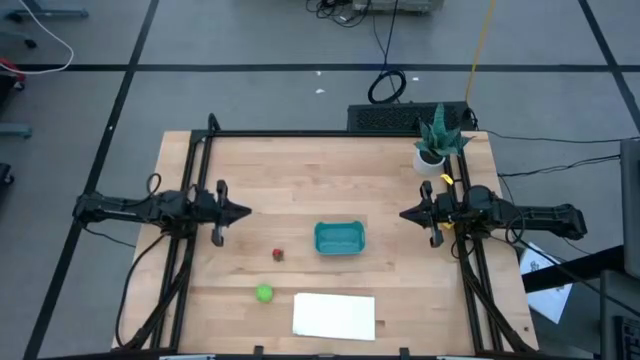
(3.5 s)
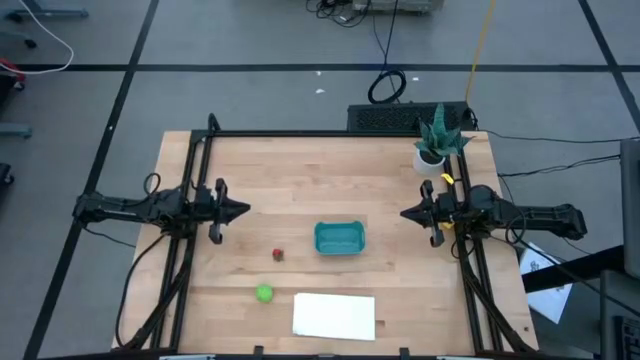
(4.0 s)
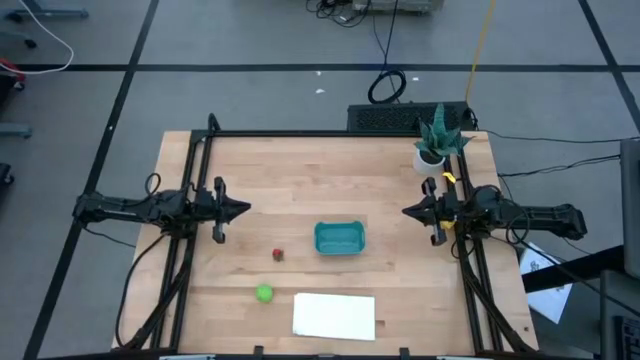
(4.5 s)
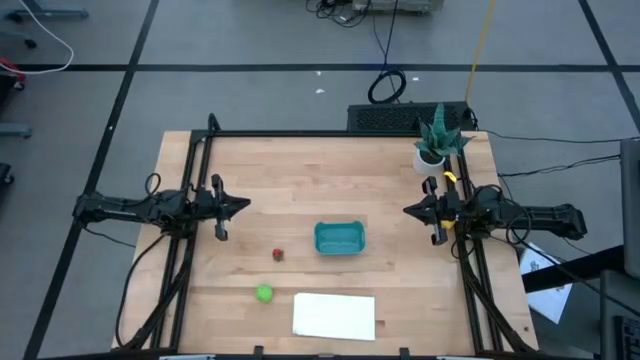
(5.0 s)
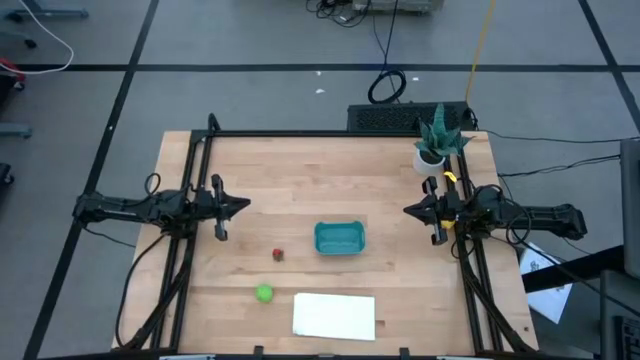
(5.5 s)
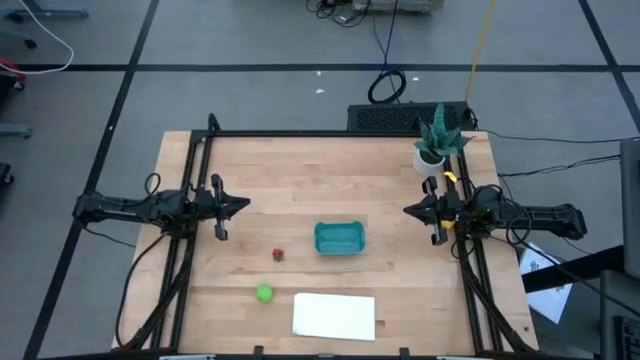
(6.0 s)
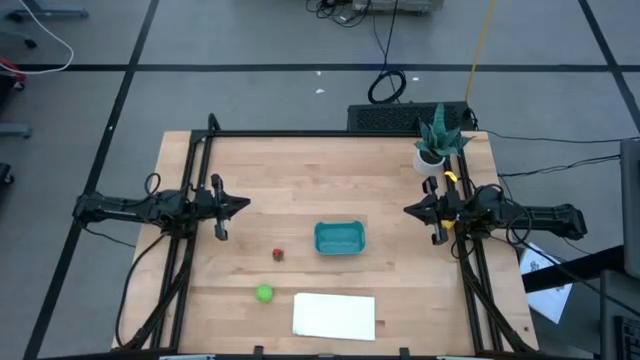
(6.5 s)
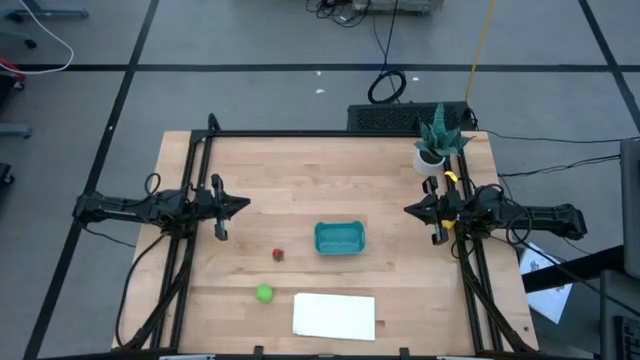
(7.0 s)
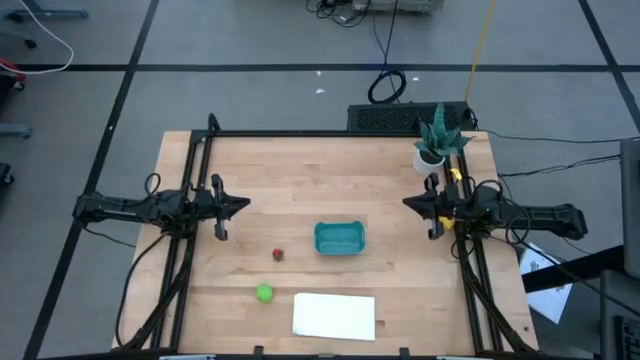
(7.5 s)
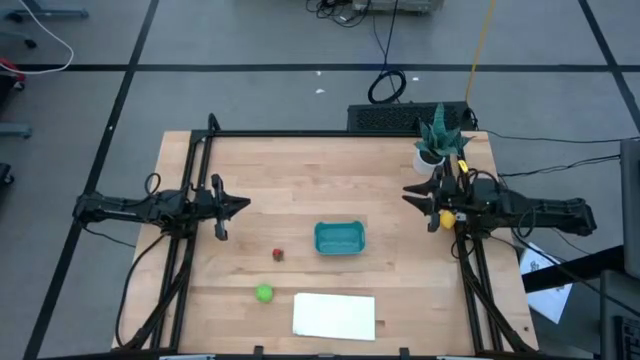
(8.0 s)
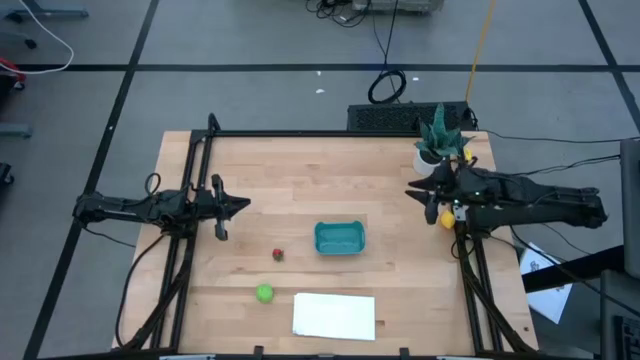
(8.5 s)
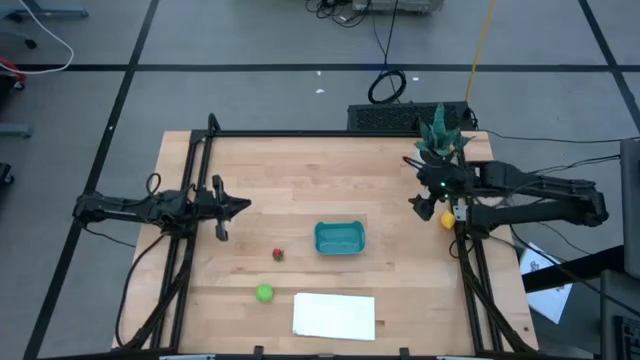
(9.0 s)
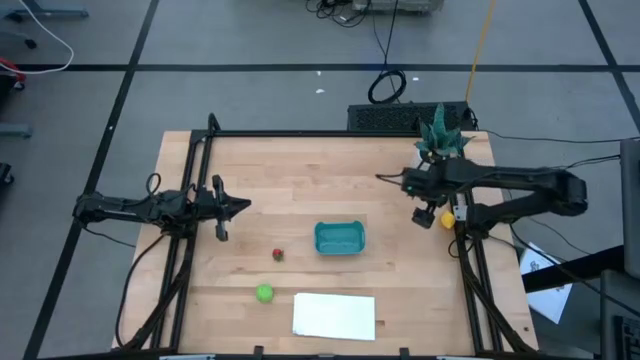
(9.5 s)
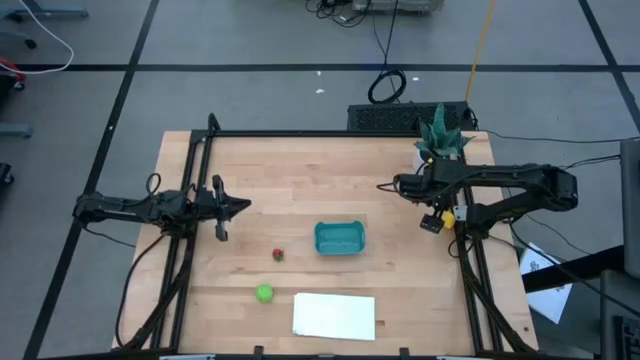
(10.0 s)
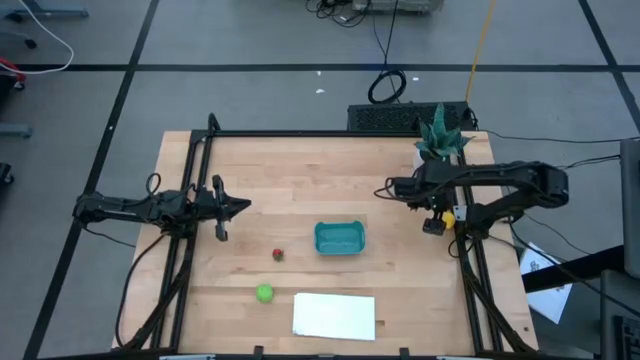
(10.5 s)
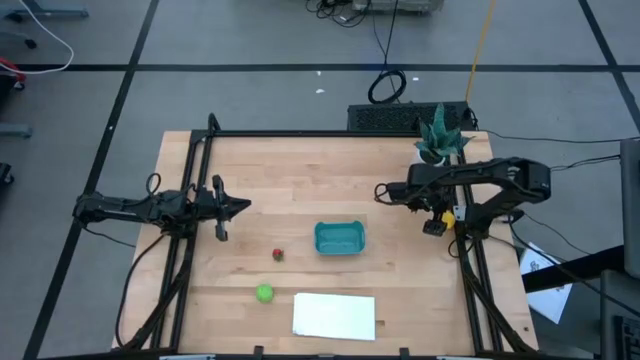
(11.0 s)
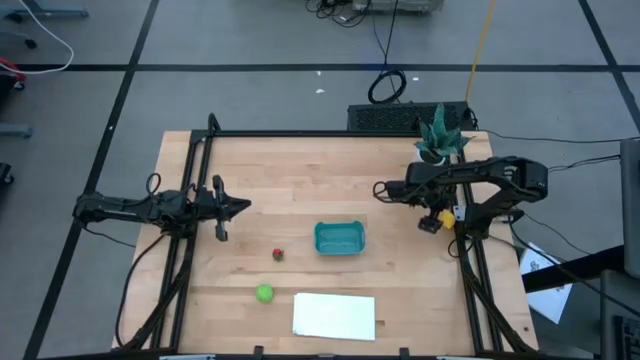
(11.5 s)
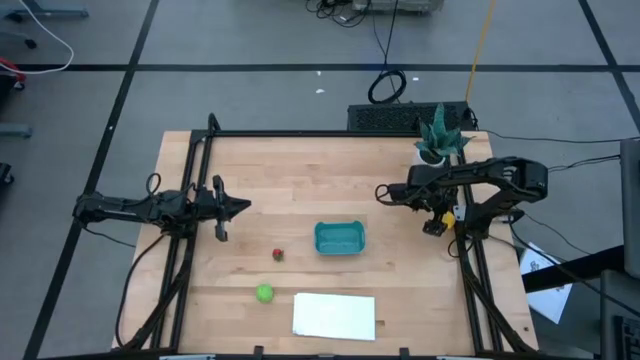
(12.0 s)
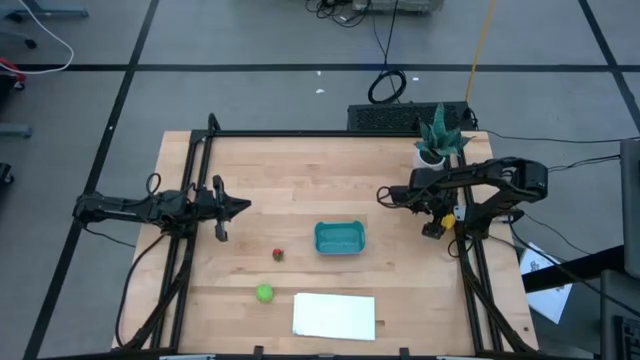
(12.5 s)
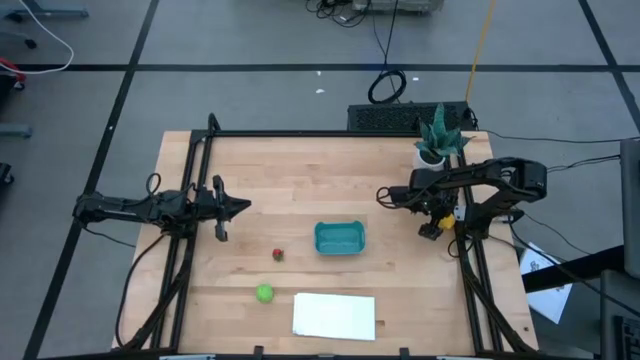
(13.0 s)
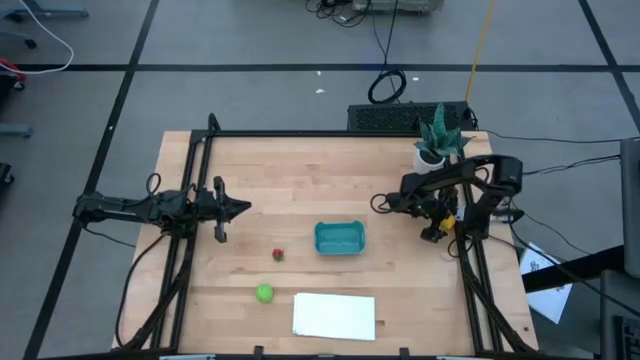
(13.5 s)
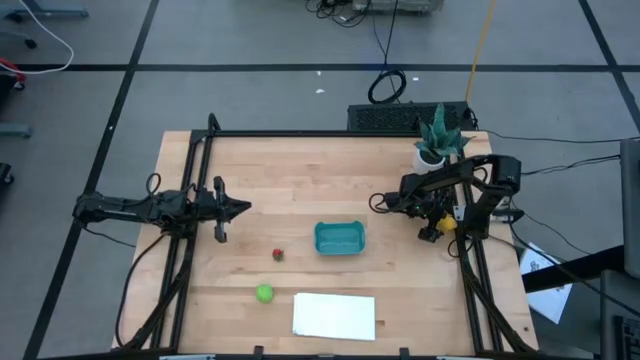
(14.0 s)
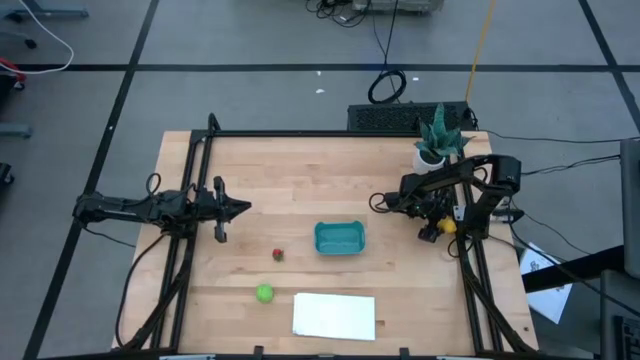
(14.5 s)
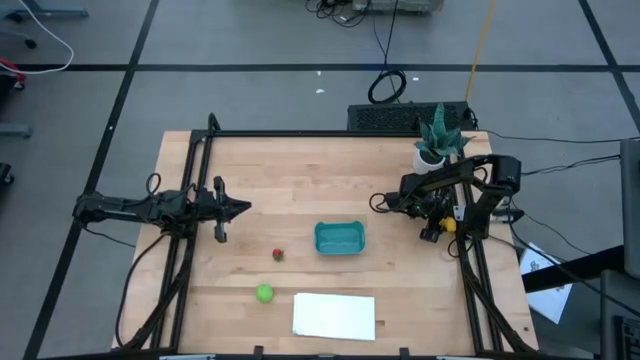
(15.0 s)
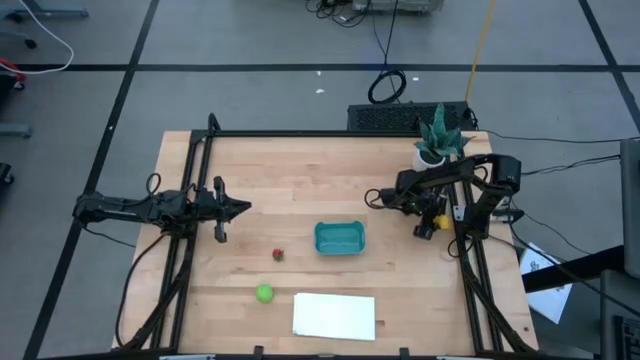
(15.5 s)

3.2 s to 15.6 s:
Task: Pick and placing Produce into tupperware
Put the yellow lemon into the blue bin

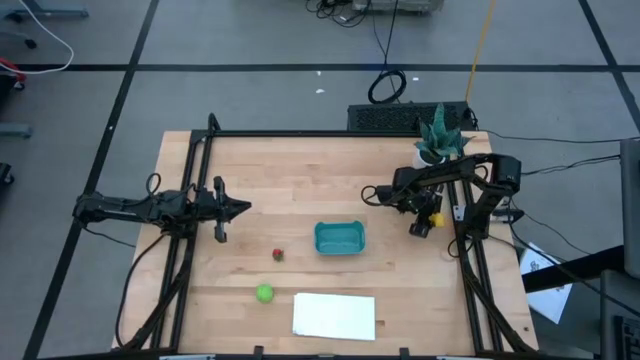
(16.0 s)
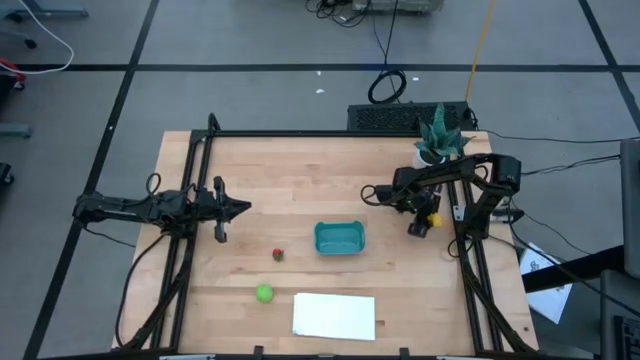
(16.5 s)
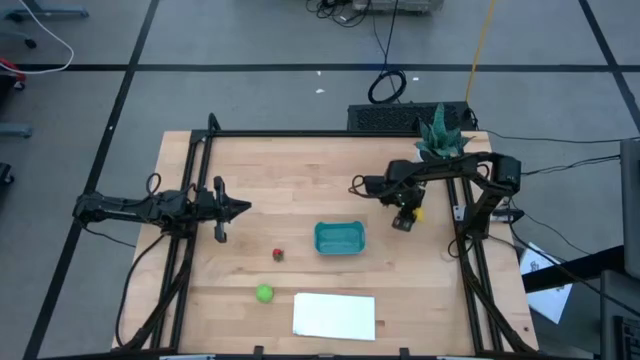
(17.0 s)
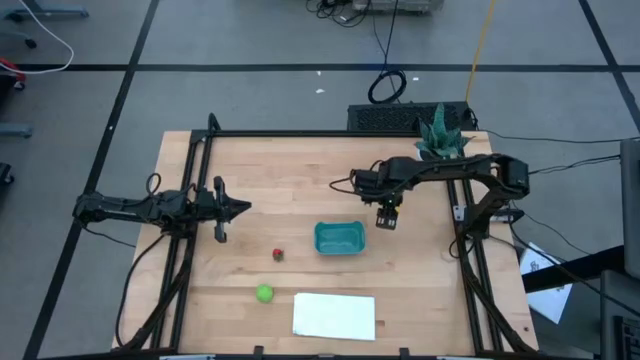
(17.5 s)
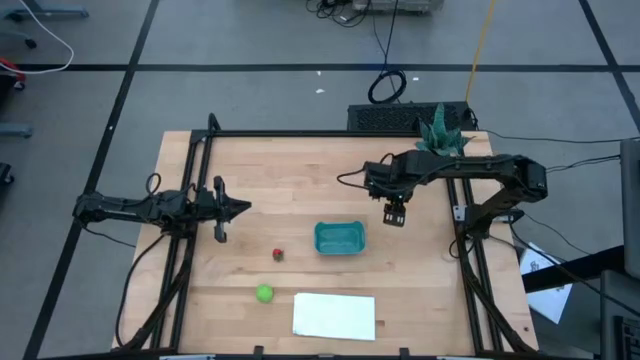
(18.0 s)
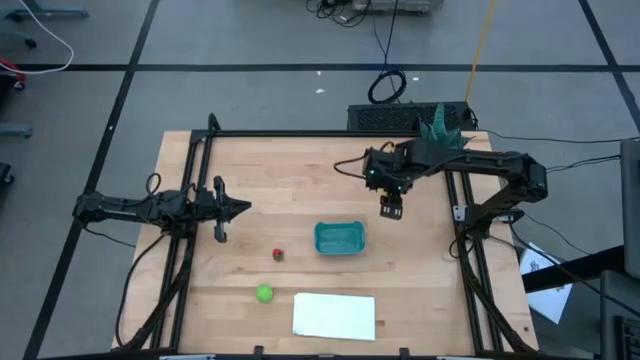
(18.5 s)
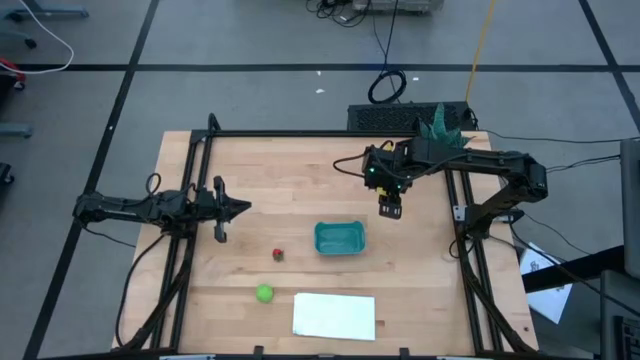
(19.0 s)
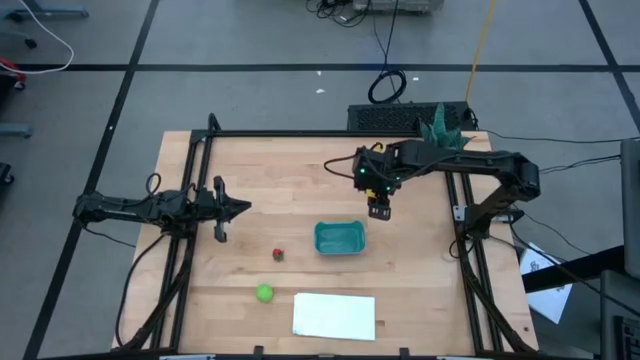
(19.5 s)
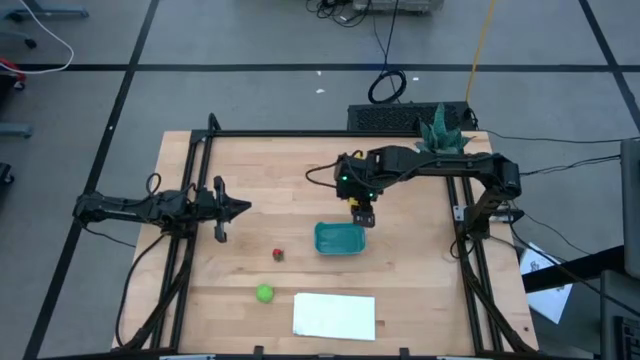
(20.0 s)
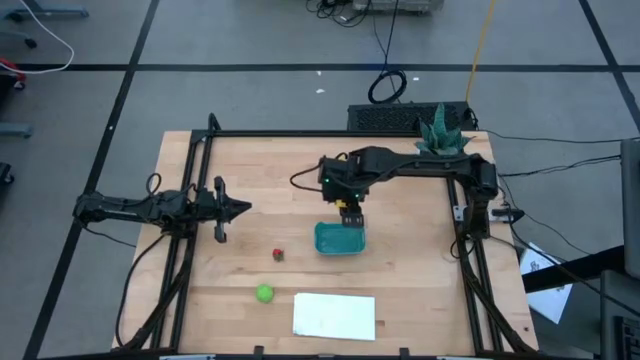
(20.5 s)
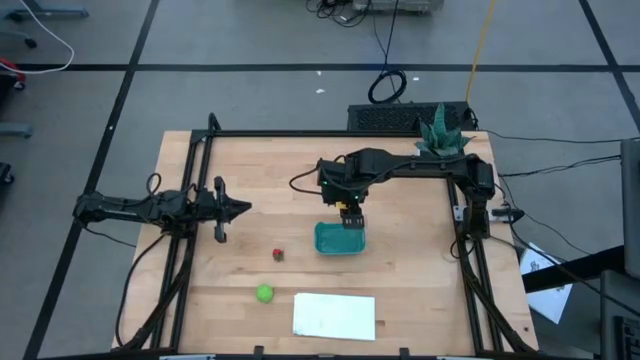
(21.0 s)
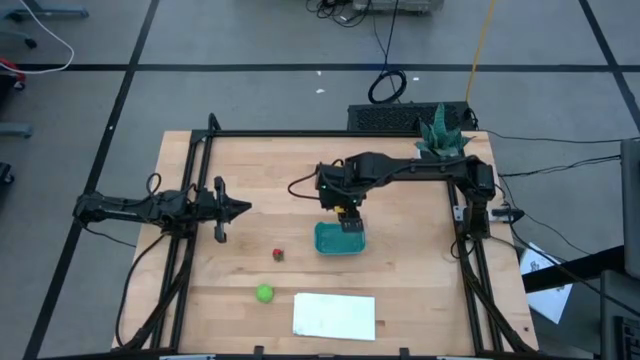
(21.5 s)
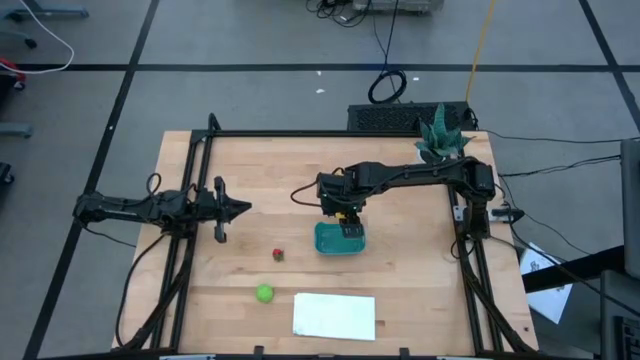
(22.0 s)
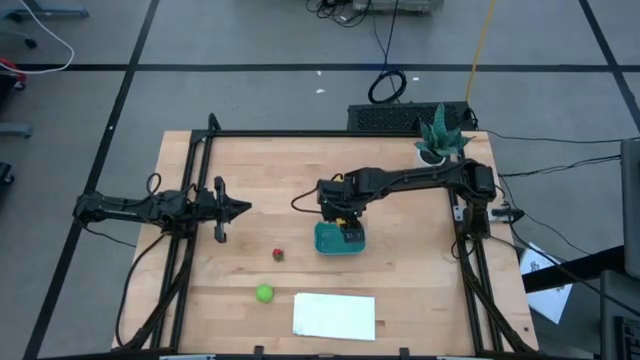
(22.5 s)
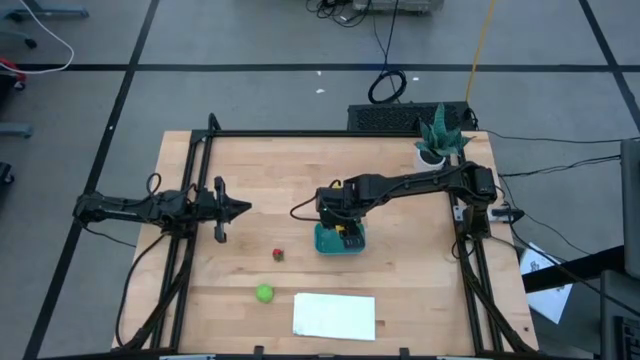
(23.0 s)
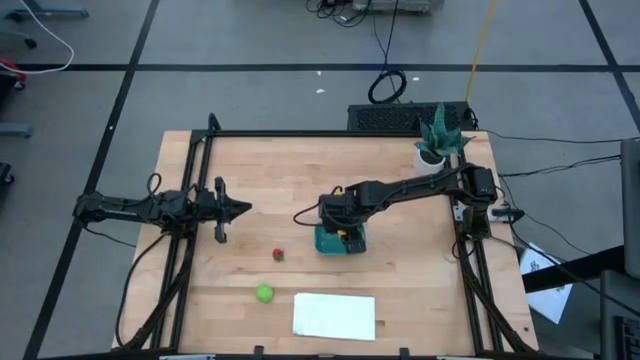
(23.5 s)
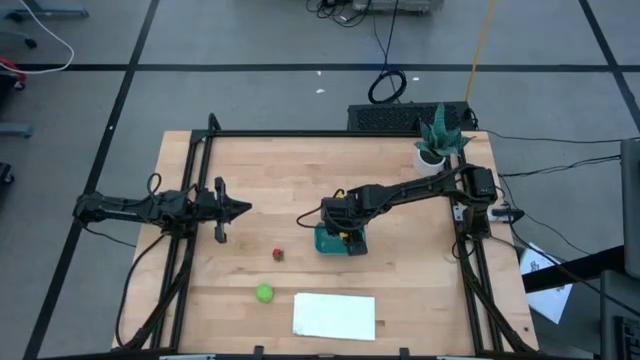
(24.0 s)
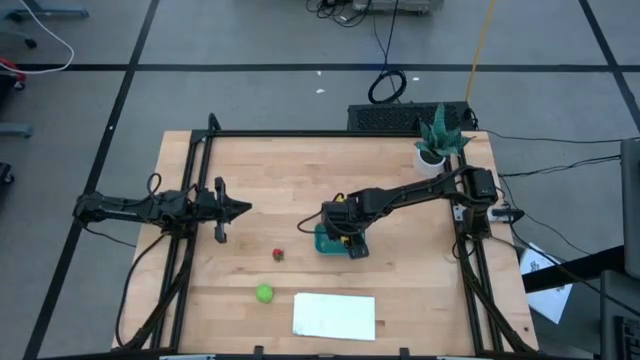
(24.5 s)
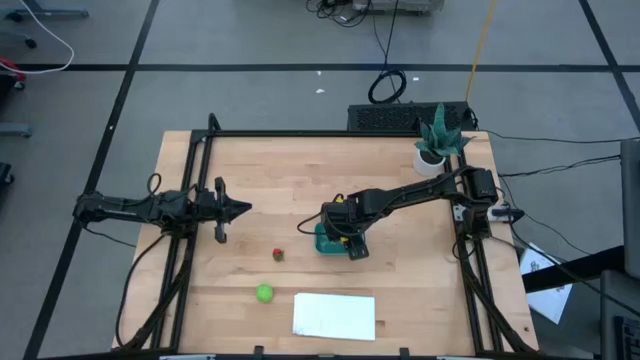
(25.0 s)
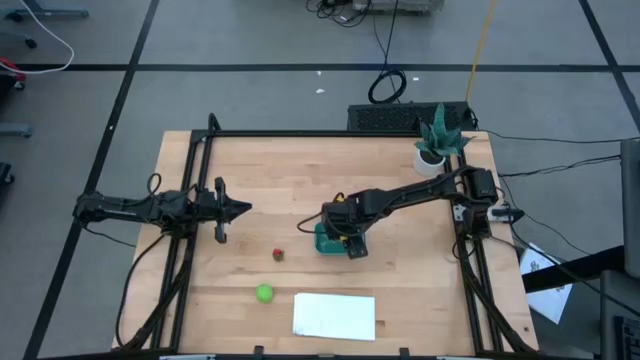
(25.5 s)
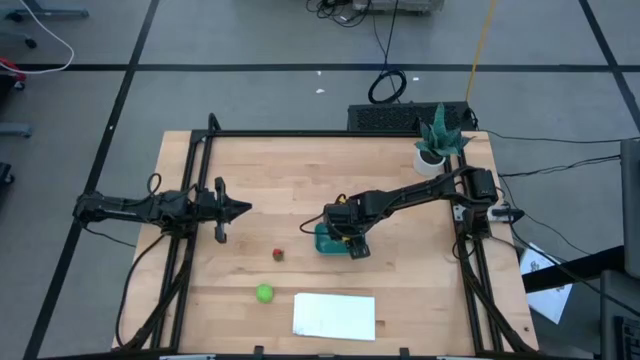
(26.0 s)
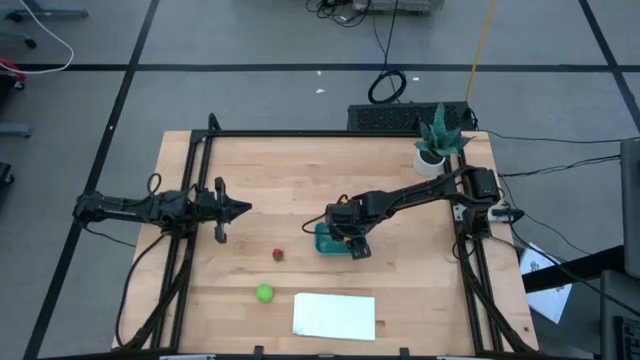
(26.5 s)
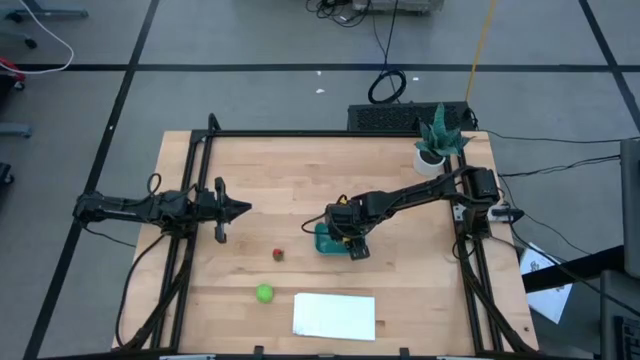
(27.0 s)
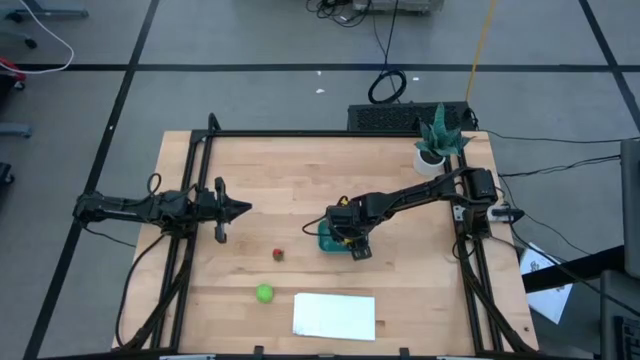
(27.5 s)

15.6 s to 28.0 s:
Put the yellow lemon into the blue bin
